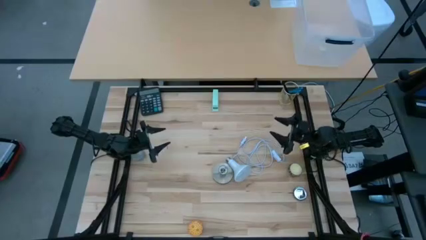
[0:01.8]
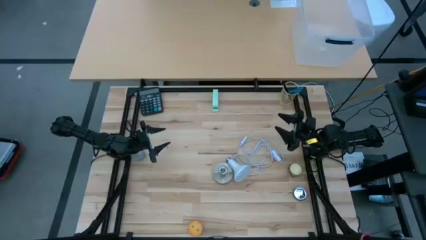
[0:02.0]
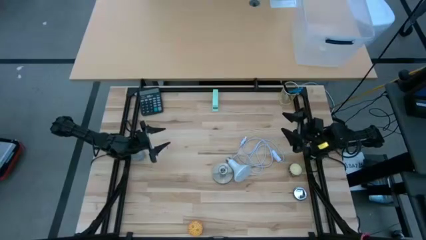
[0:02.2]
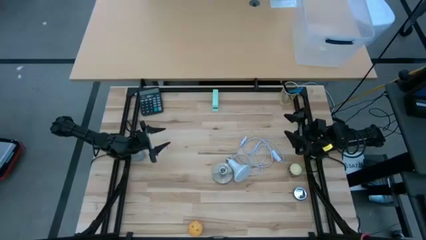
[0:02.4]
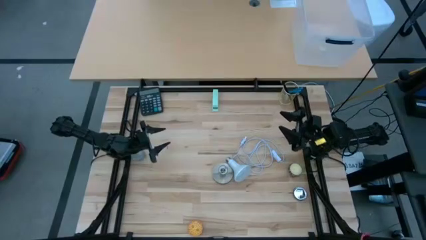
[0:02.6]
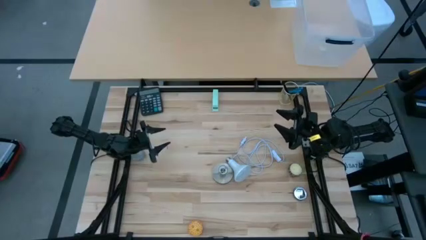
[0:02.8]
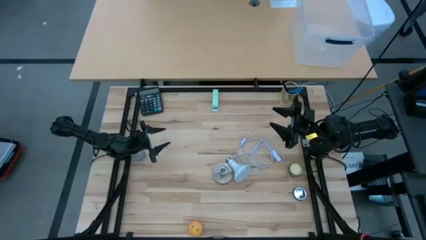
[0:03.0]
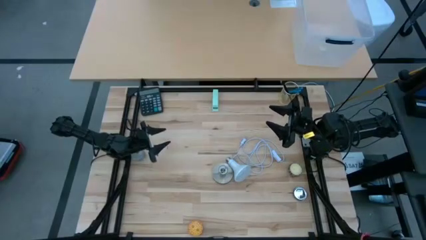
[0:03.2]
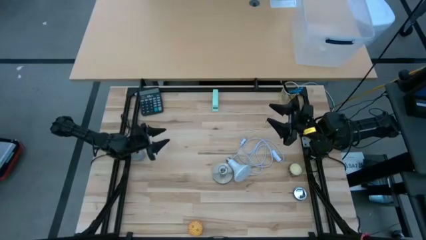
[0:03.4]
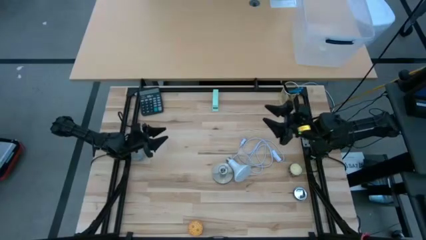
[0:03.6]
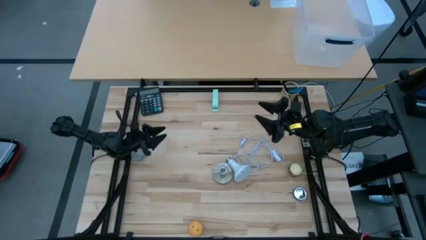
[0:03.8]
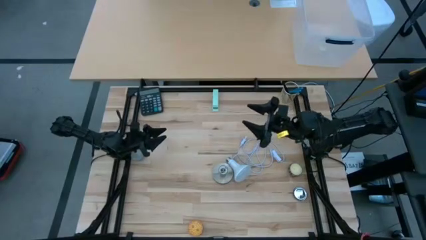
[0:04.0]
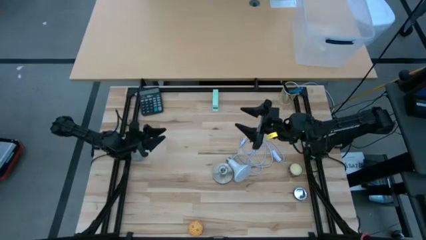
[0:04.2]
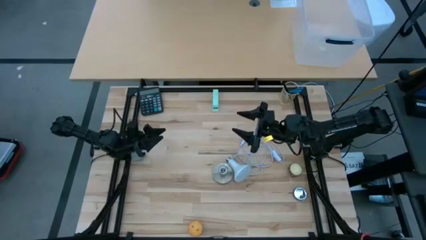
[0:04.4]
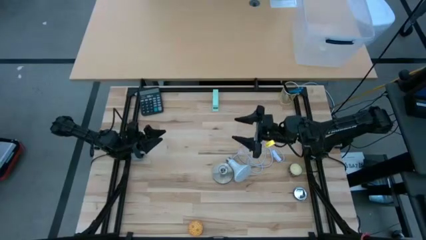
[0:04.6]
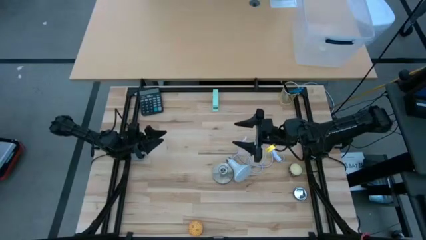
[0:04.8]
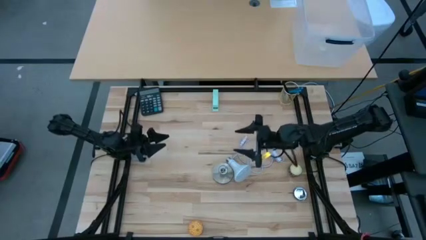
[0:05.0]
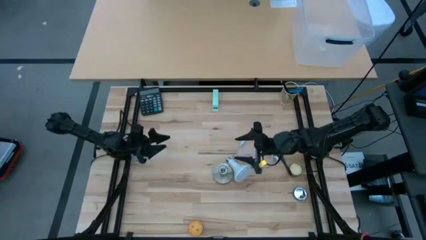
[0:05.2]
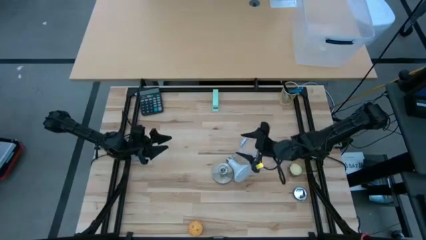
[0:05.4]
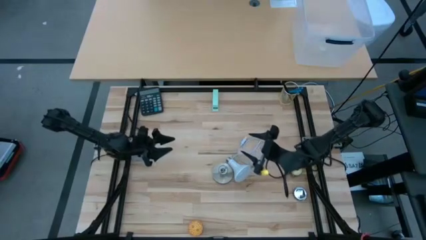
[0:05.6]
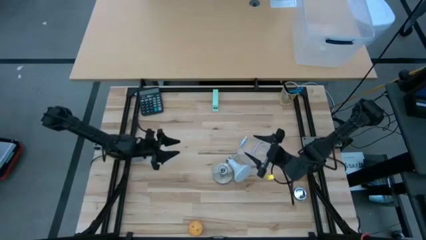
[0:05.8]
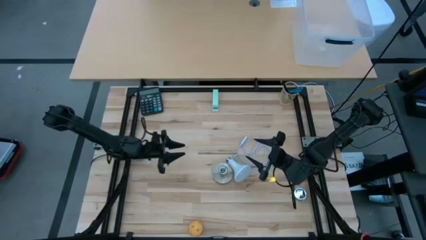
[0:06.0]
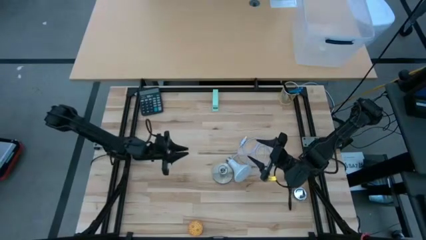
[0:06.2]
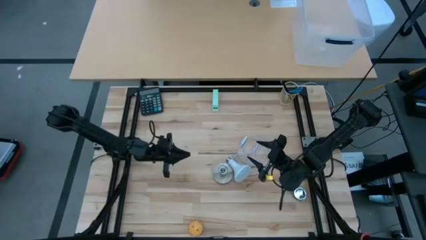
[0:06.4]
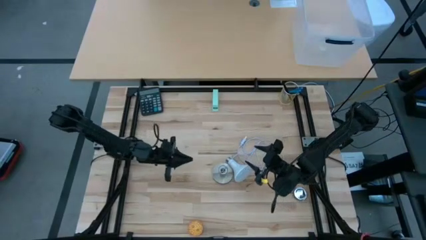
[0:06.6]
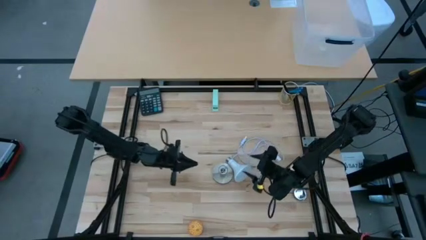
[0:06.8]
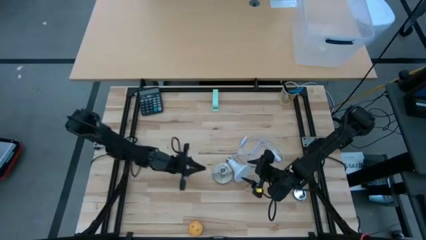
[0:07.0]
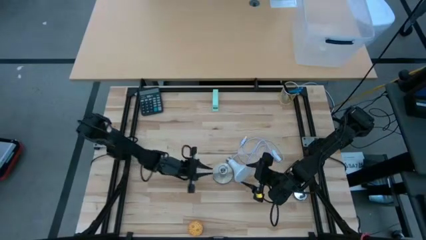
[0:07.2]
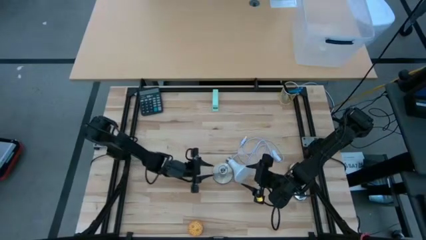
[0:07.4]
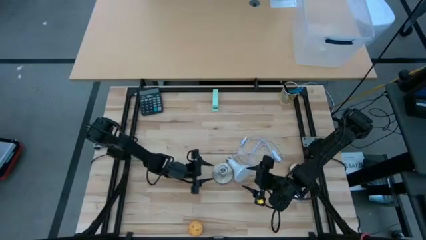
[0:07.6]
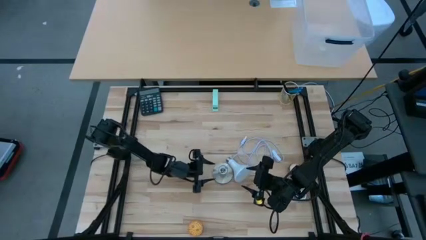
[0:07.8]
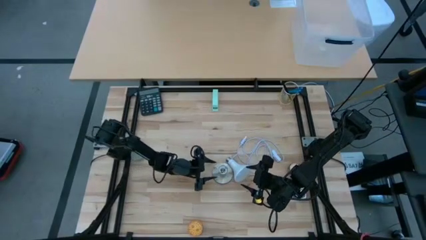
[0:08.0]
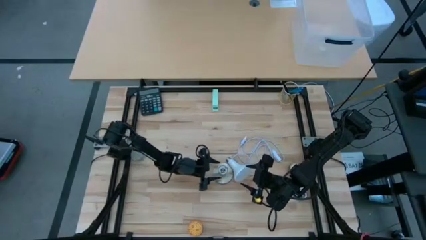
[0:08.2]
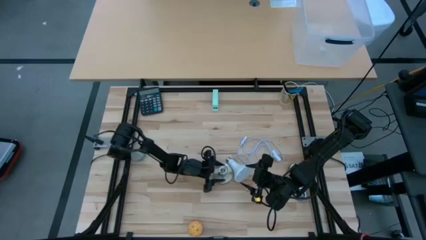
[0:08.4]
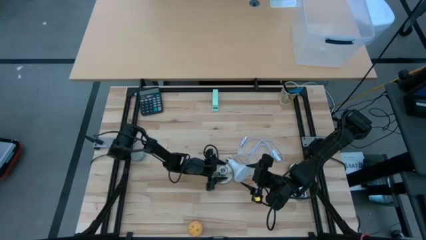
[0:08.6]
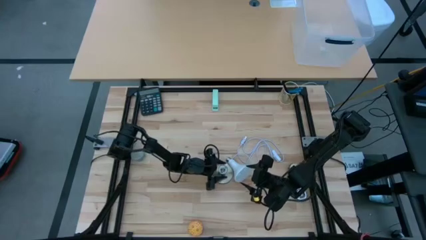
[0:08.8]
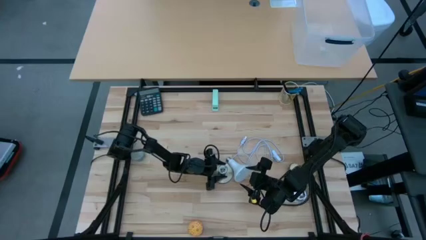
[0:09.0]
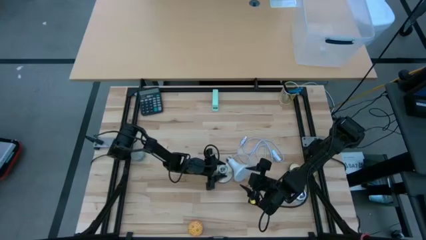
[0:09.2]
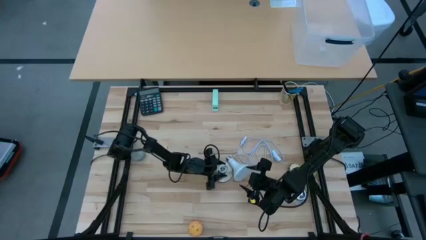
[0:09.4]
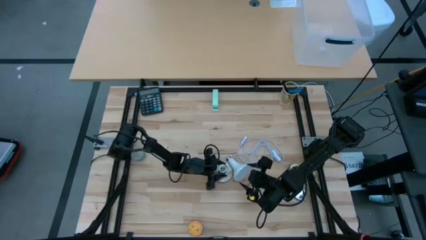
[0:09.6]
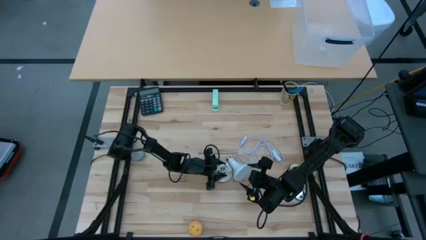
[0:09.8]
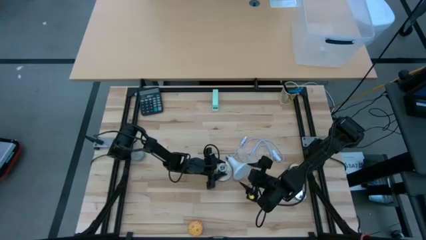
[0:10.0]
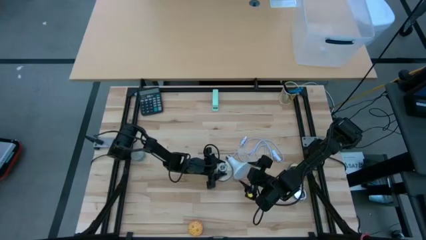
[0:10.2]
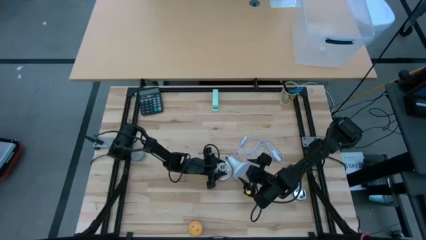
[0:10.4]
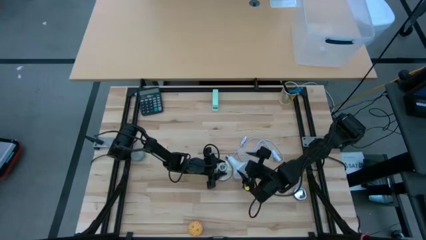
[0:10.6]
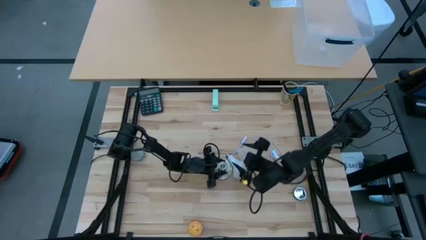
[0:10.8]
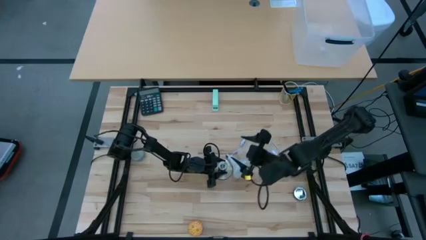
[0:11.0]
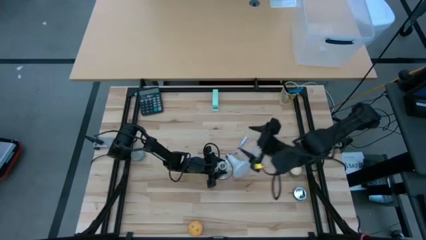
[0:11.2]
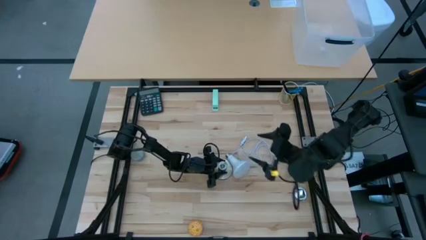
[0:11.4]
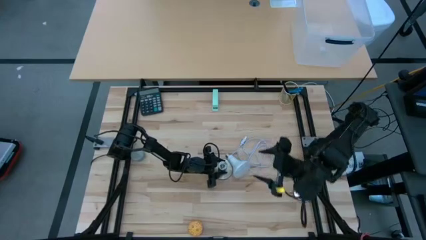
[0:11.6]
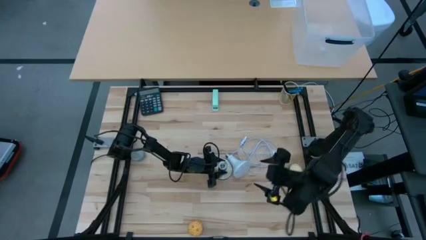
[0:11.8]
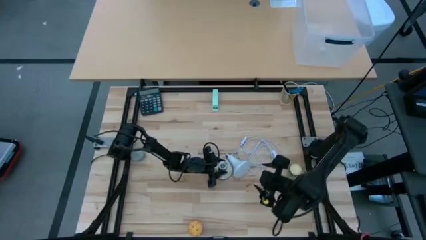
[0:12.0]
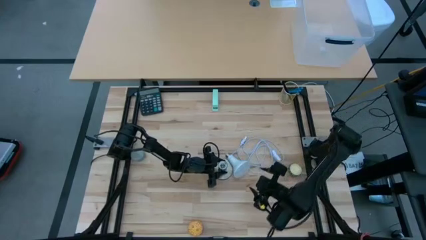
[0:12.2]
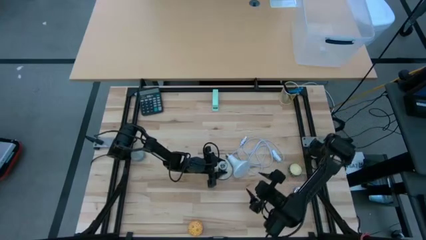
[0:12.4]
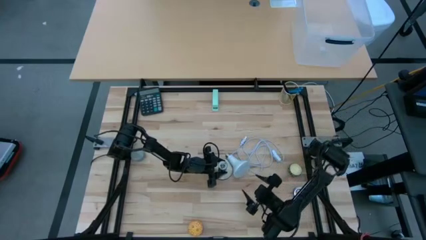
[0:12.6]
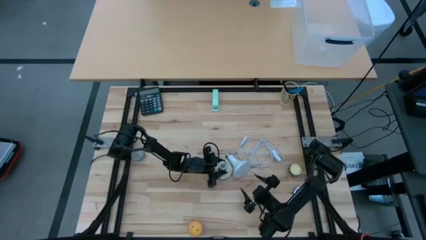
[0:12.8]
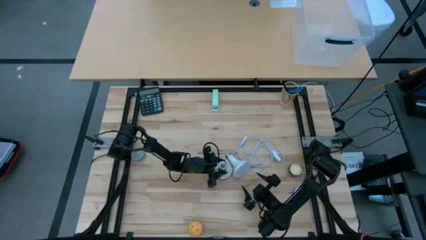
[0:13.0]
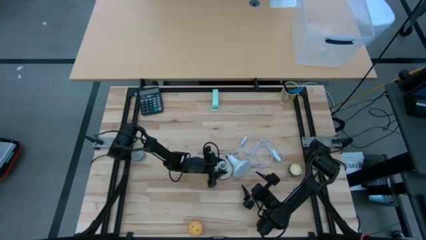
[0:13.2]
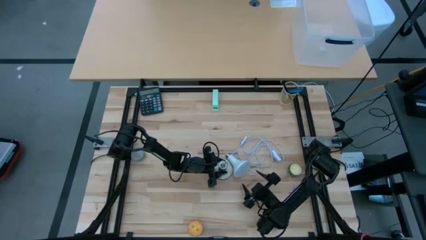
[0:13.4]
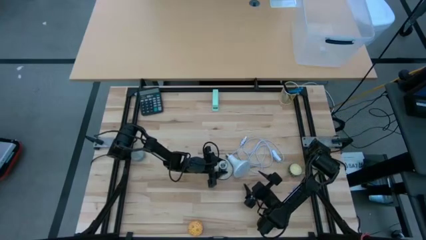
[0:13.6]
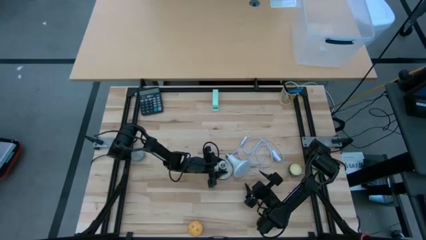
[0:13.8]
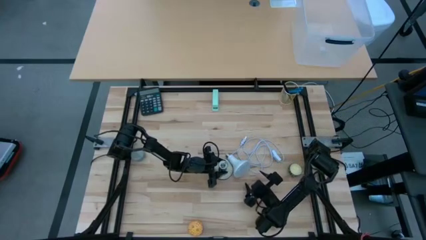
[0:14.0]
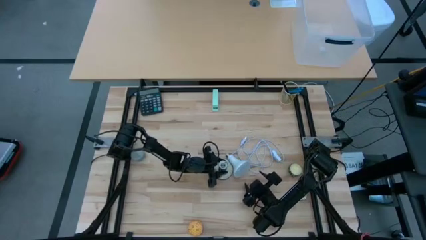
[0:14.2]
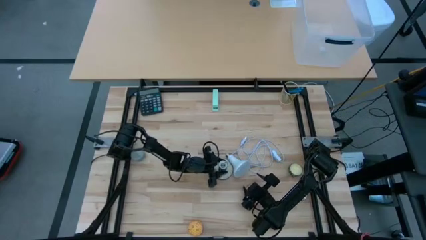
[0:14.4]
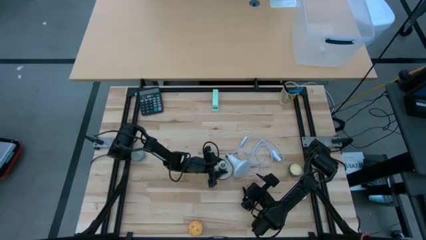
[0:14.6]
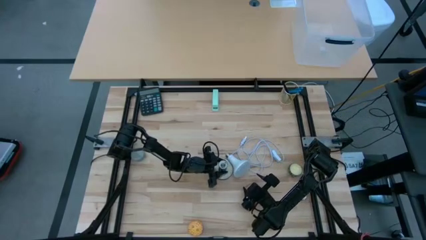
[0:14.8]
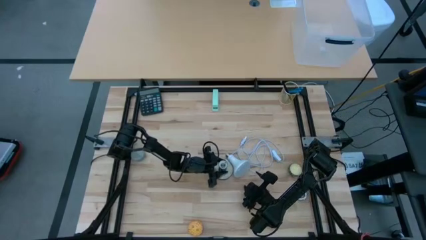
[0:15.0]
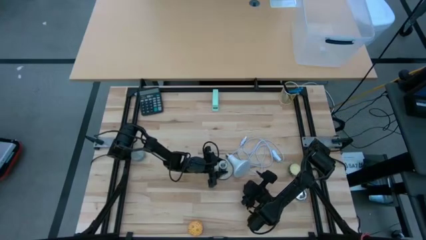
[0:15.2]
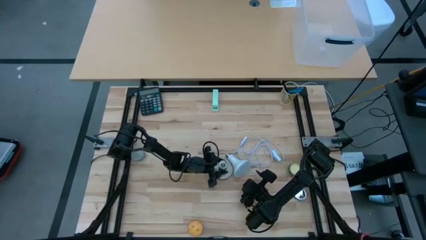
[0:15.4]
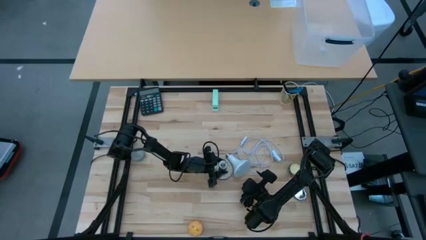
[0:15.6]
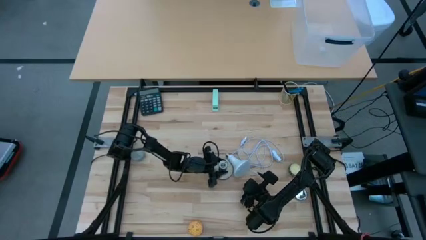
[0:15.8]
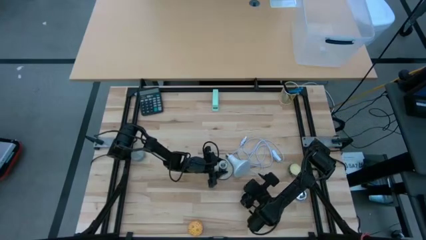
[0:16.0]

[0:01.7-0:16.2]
Task: Screw lightbulb
Prepare the lamp
